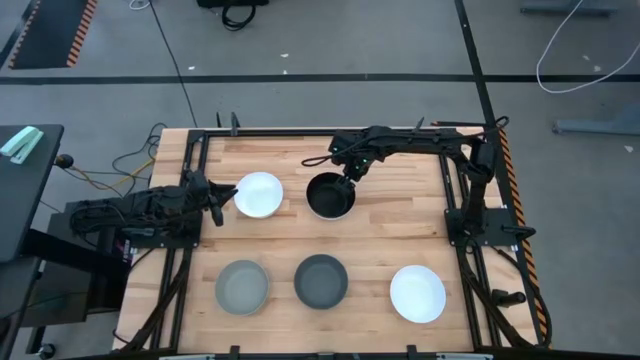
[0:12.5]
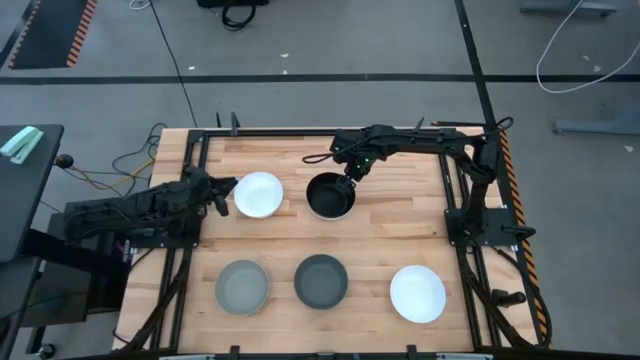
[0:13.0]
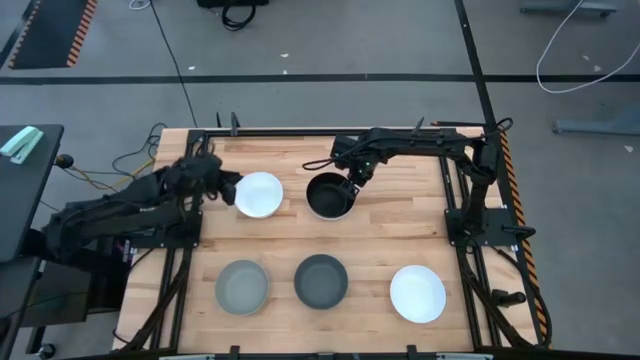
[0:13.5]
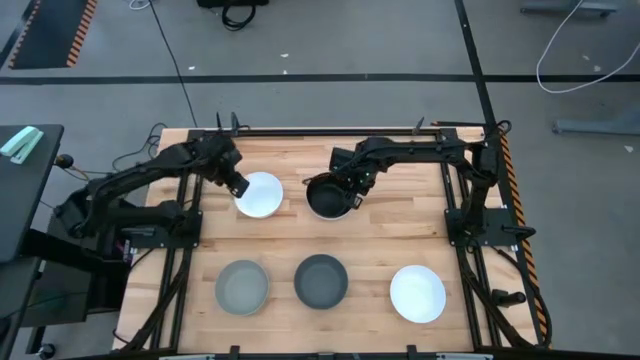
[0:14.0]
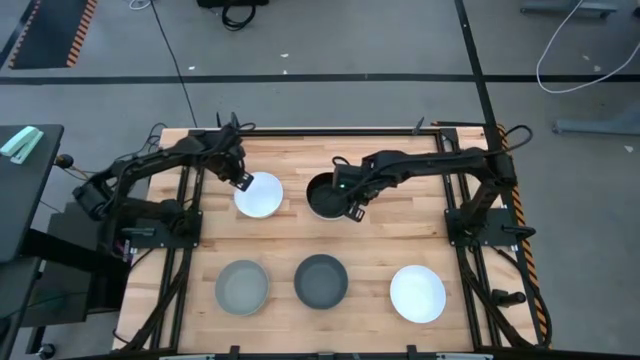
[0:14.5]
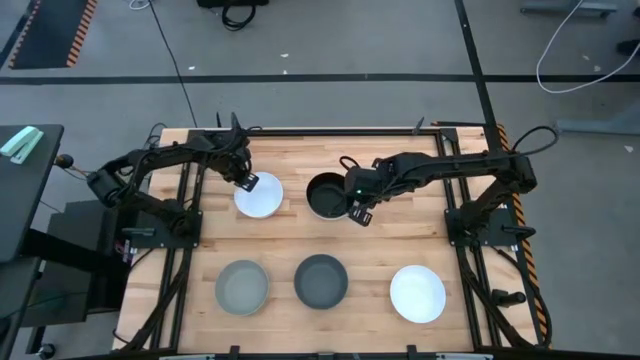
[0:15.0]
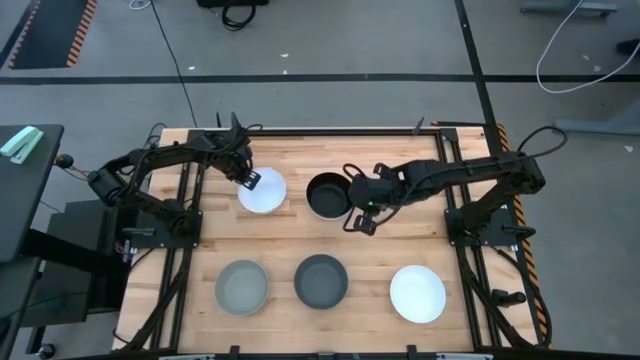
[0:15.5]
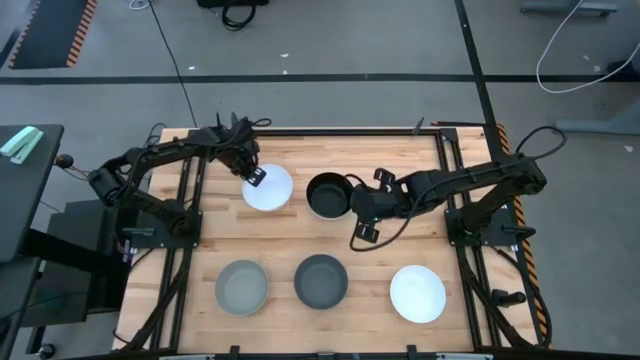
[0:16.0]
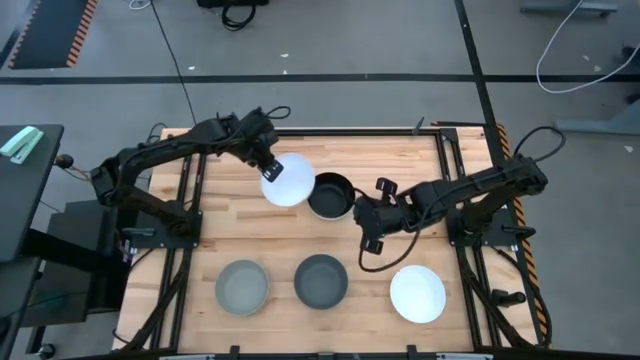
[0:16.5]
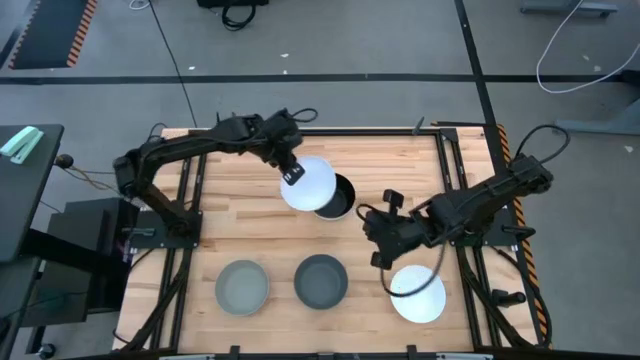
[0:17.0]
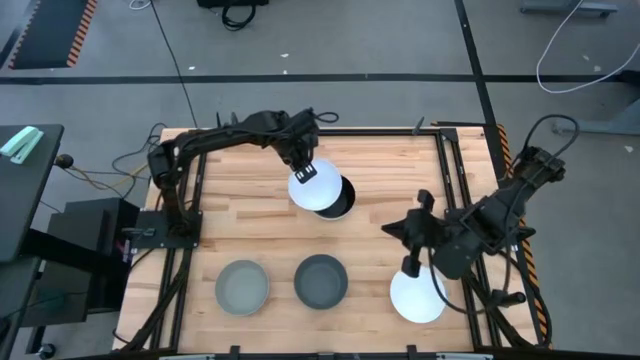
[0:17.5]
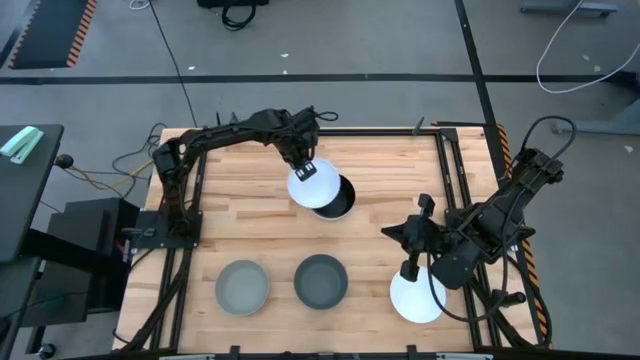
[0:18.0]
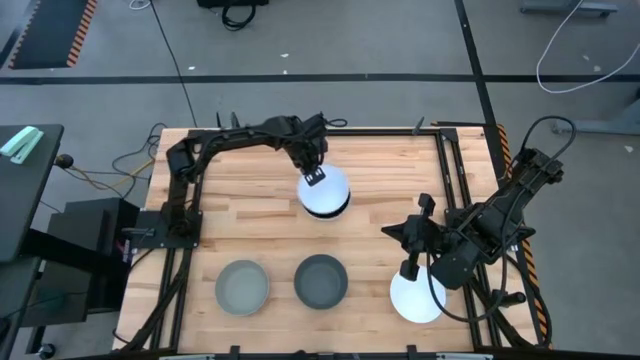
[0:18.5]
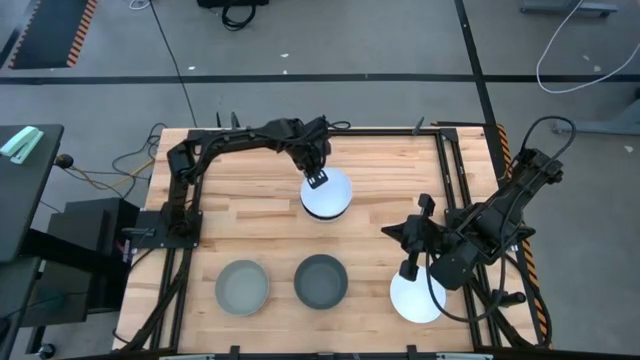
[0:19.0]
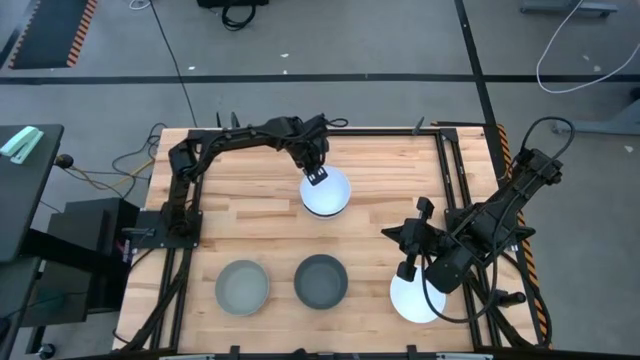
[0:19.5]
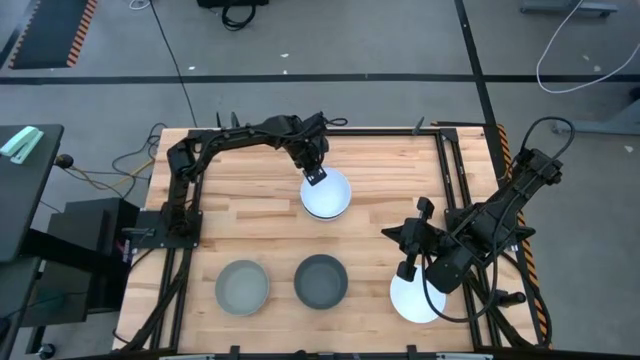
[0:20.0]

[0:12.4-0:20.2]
Task: Nest bowls inside each other
Stack the top white bowl on the black bowl

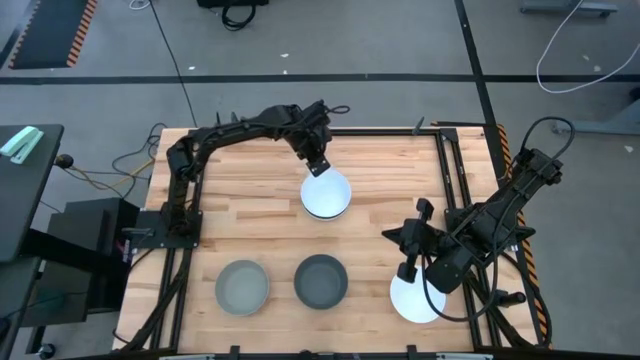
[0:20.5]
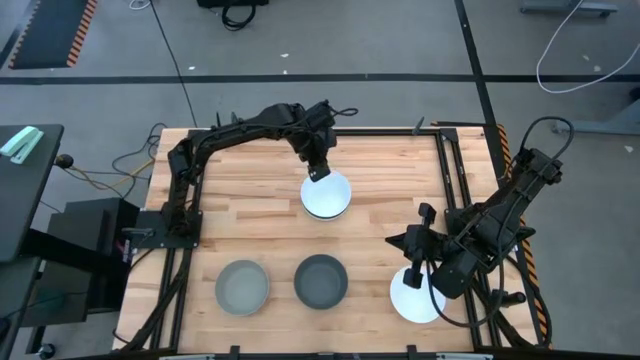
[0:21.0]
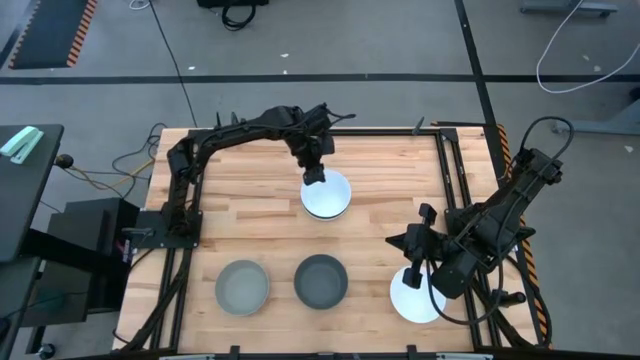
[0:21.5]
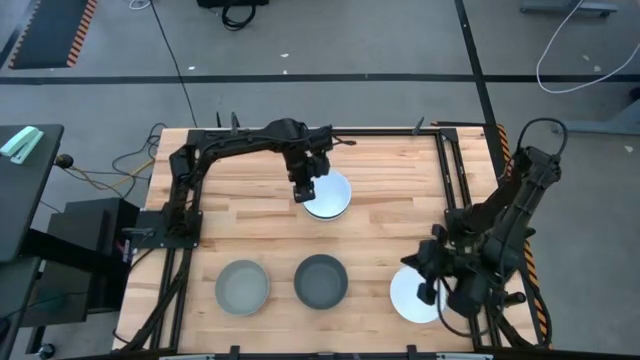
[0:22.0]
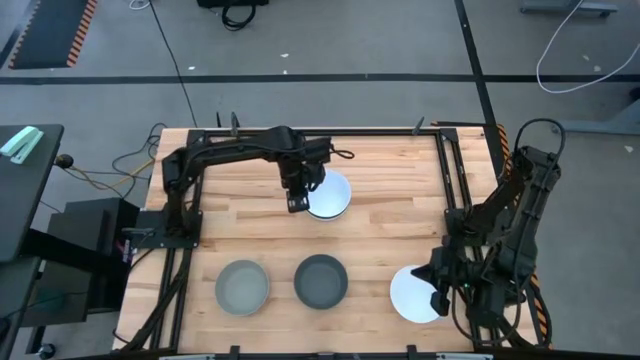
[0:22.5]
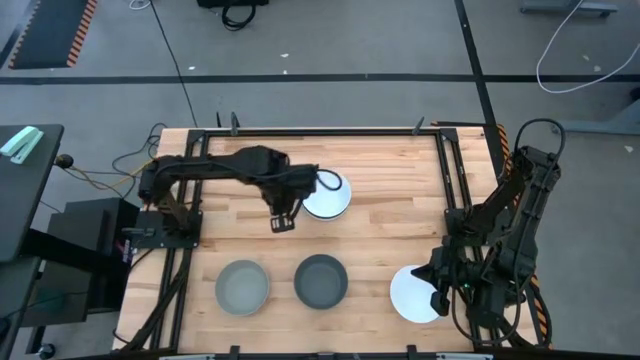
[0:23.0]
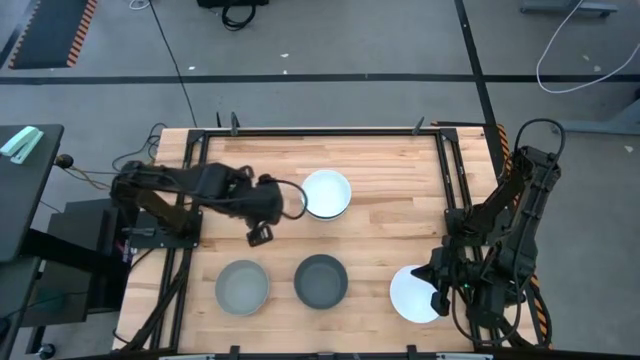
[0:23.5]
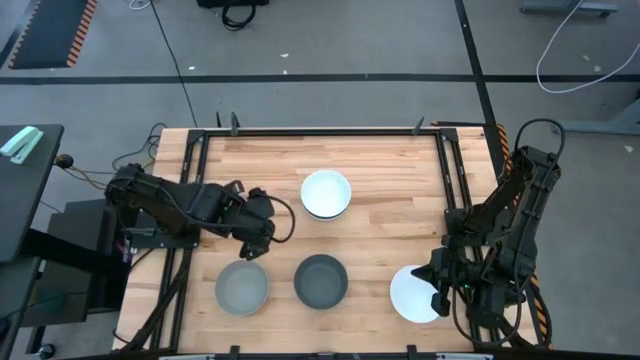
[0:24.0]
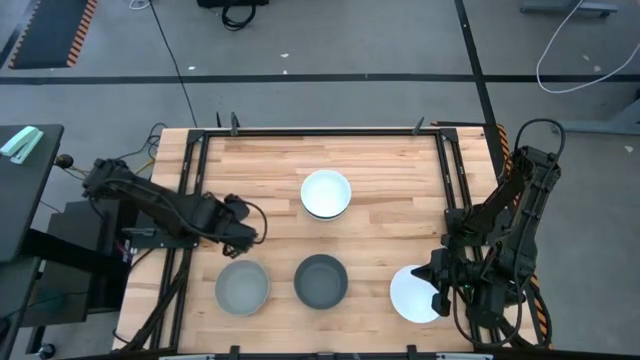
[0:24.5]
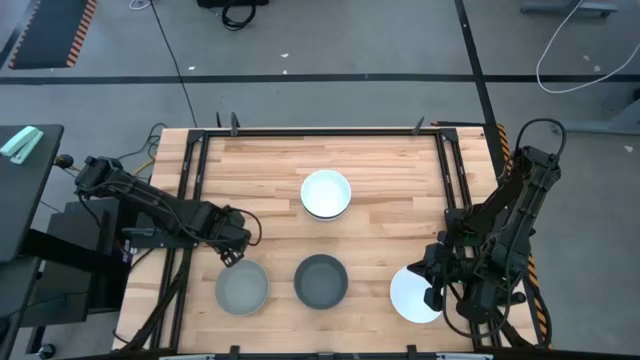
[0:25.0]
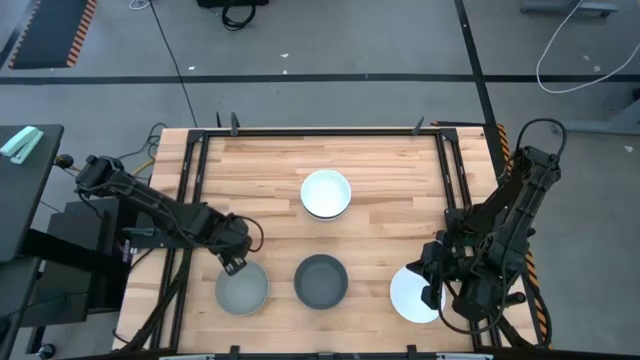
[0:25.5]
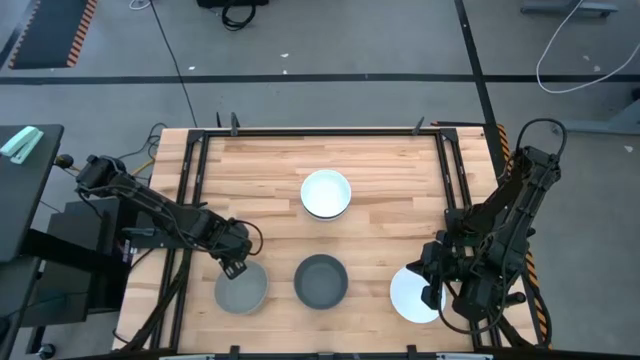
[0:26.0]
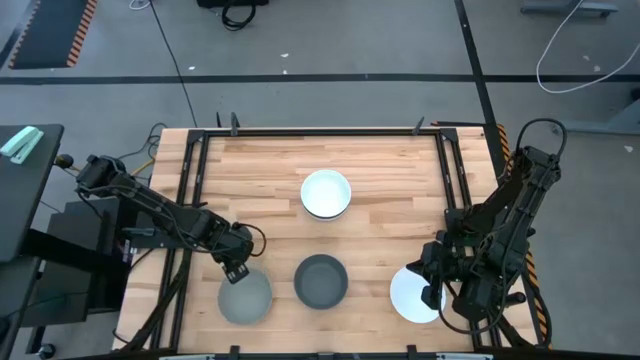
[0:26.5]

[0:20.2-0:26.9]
Stack the gray bowl on the top white bowl

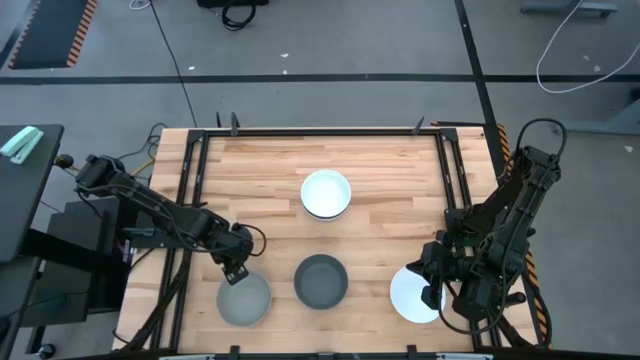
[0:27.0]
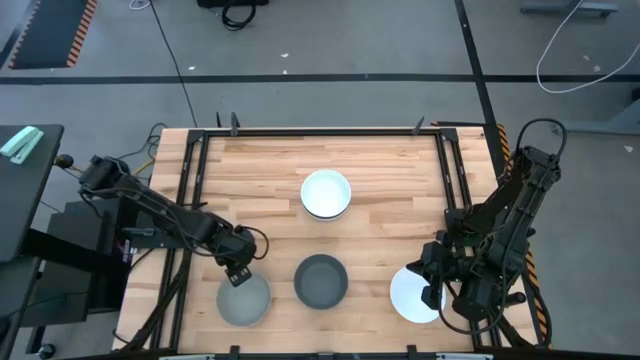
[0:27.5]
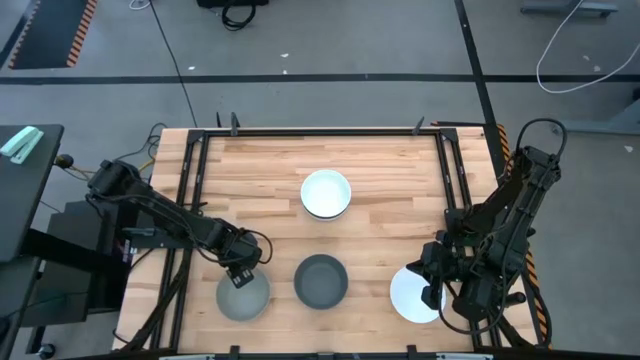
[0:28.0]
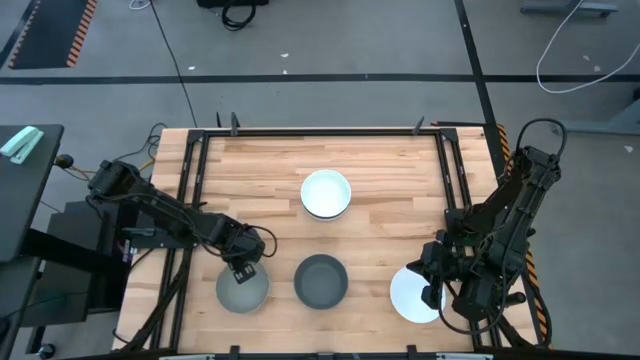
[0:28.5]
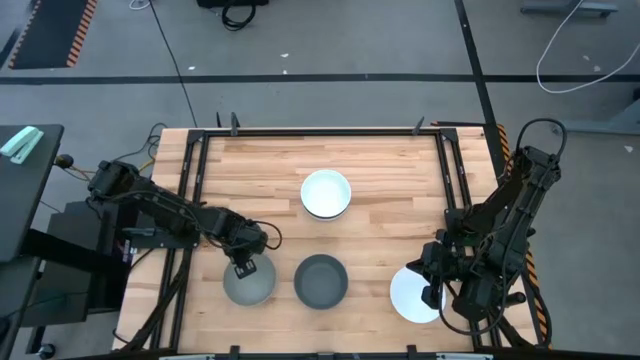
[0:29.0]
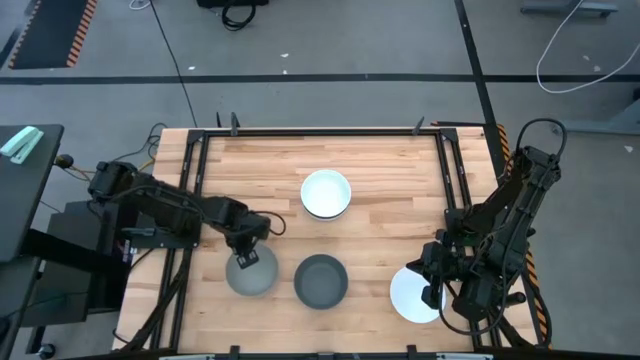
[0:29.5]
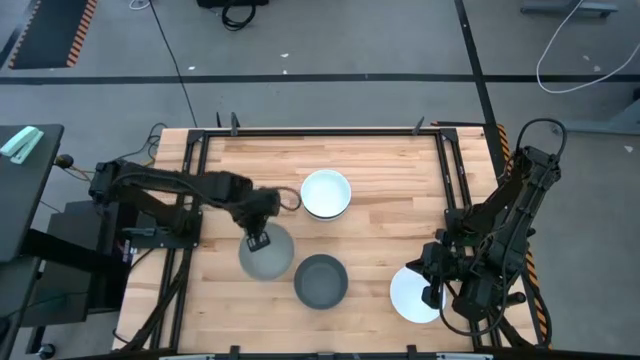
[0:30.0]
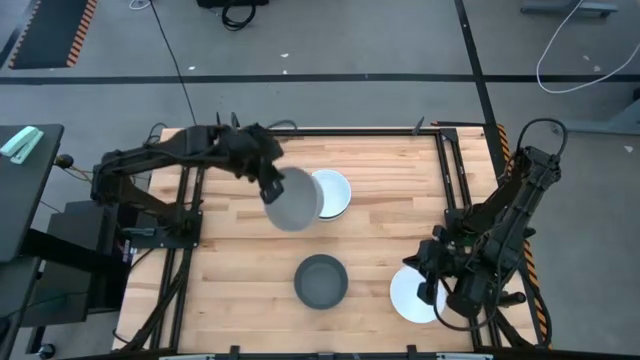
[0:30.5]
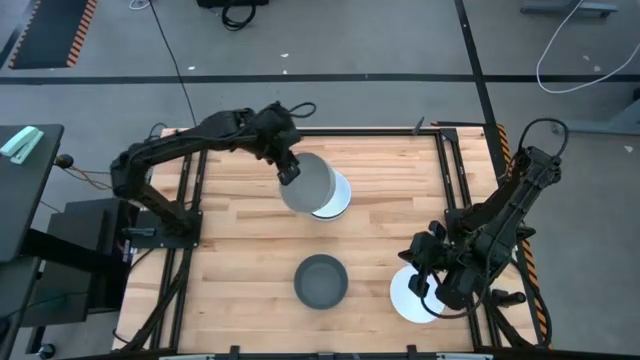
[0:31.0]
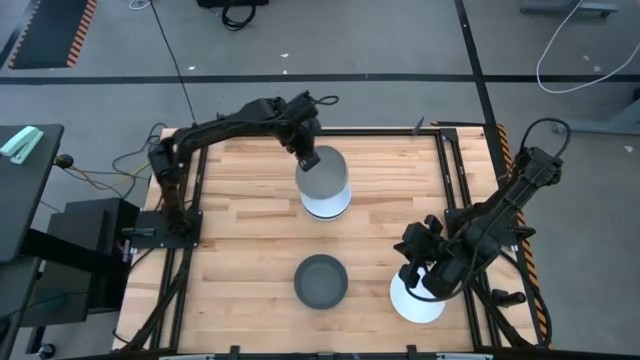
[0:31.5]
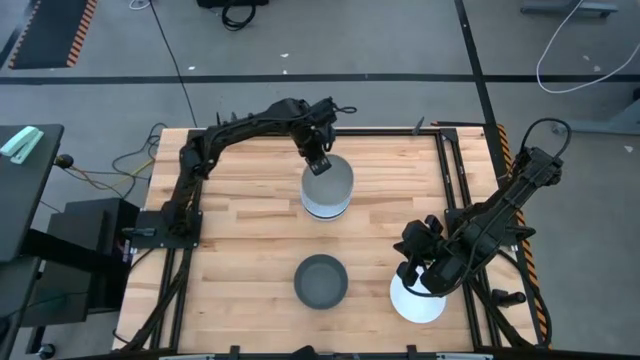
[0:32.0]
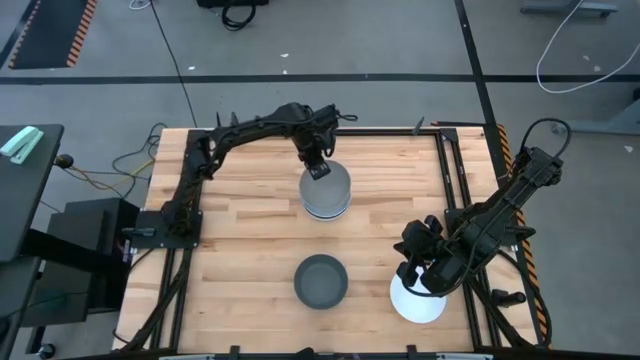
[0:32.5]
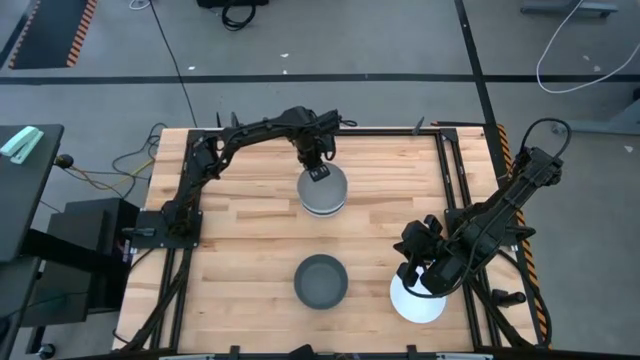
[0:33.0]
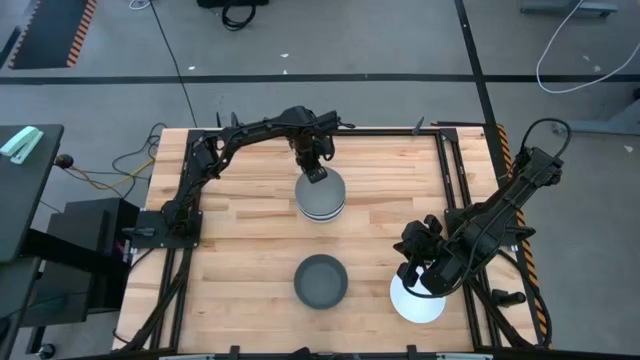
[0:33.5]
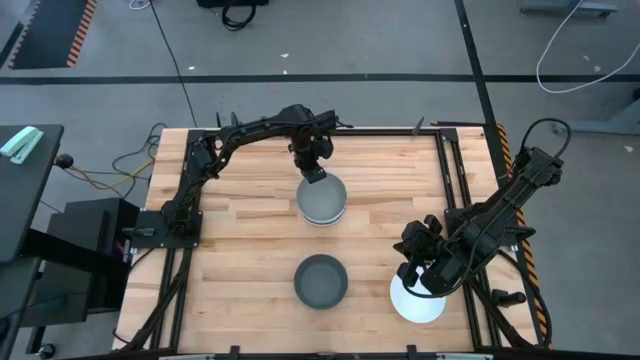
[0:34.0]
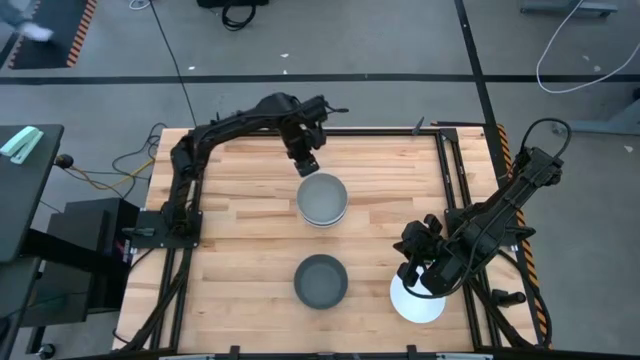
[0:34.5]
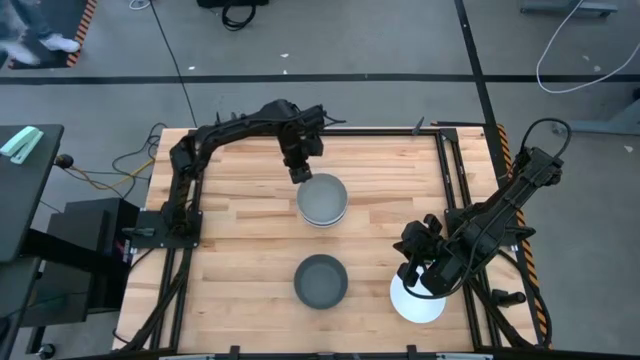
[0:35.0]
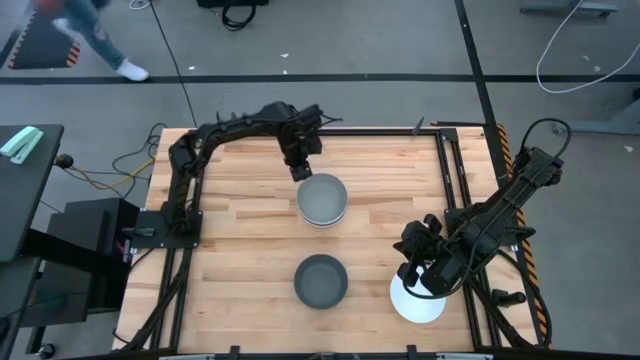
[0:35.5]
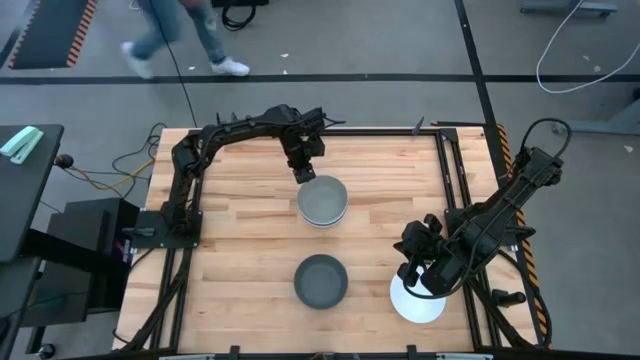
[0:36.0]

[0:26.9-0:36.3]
Stack the gray bowl on the top white bowl
